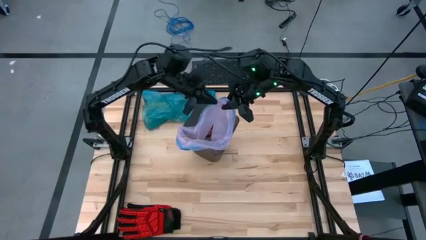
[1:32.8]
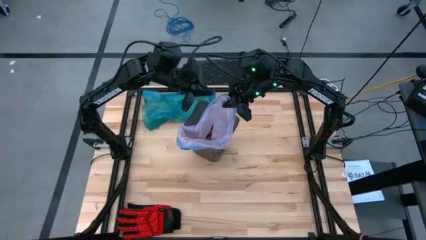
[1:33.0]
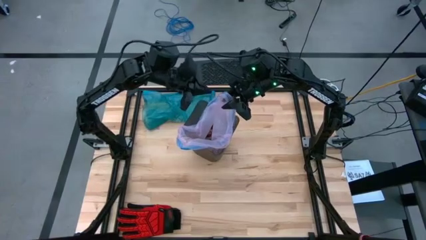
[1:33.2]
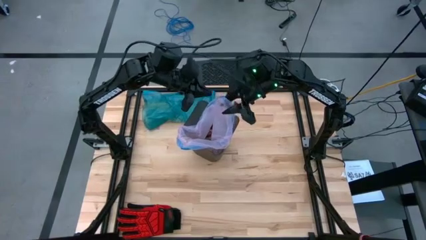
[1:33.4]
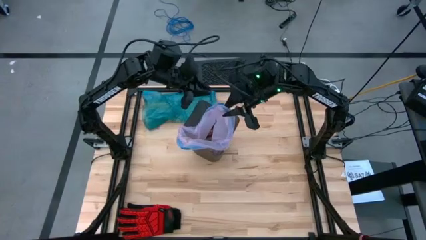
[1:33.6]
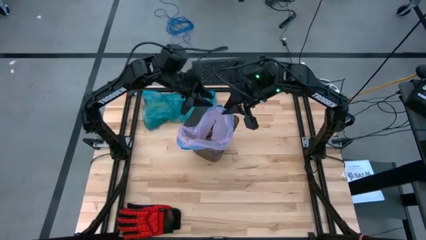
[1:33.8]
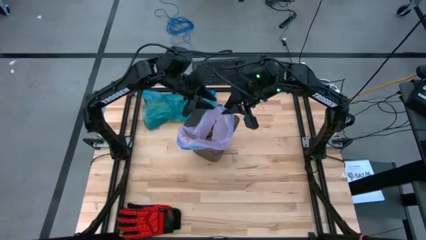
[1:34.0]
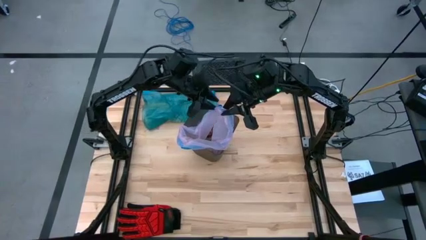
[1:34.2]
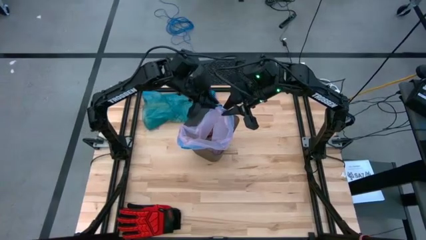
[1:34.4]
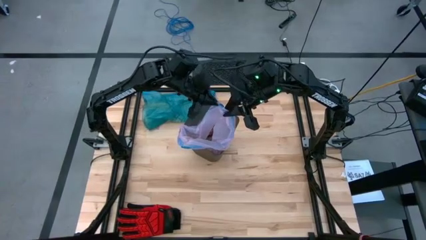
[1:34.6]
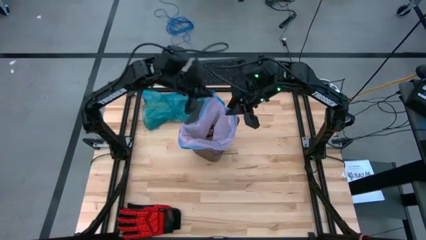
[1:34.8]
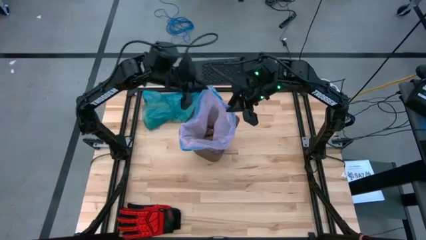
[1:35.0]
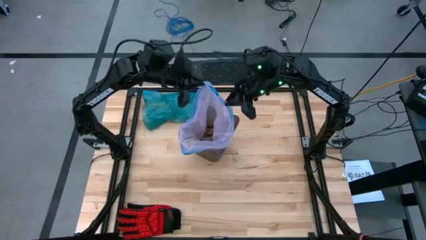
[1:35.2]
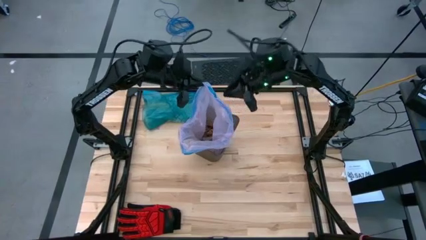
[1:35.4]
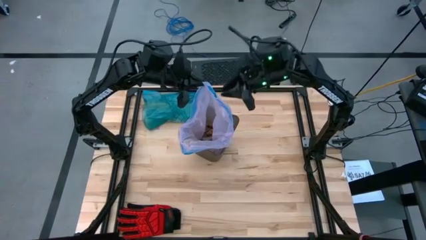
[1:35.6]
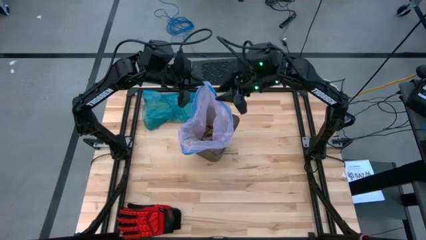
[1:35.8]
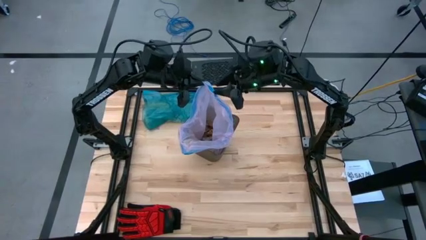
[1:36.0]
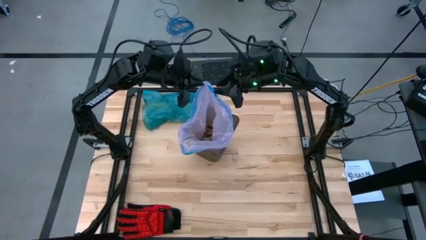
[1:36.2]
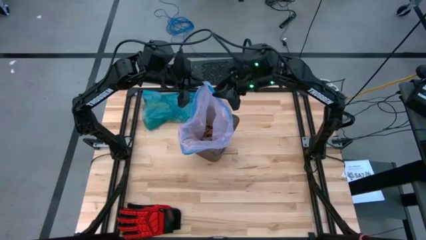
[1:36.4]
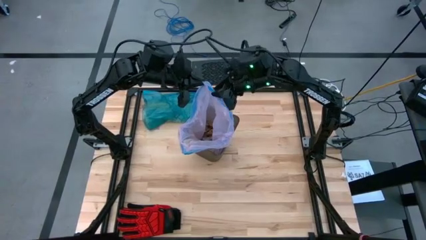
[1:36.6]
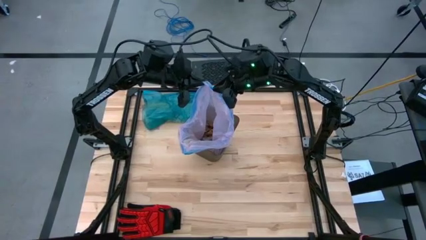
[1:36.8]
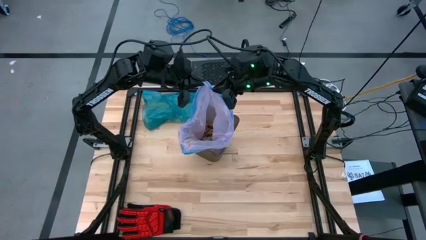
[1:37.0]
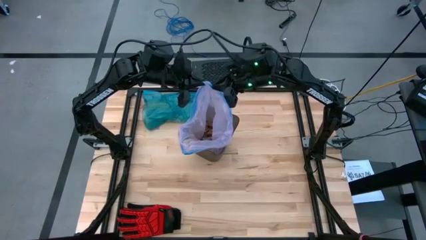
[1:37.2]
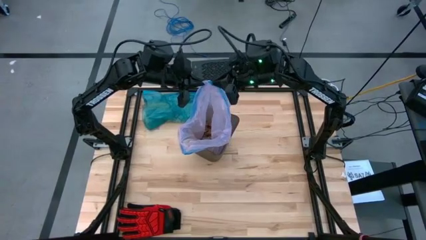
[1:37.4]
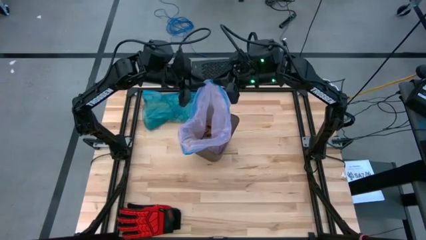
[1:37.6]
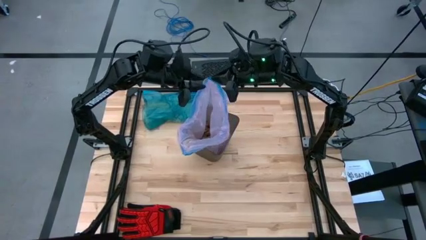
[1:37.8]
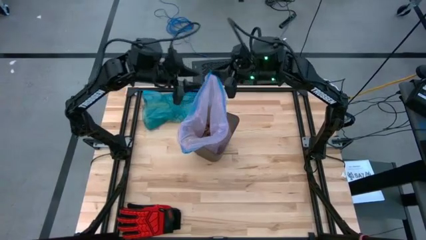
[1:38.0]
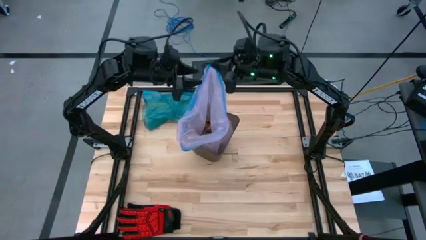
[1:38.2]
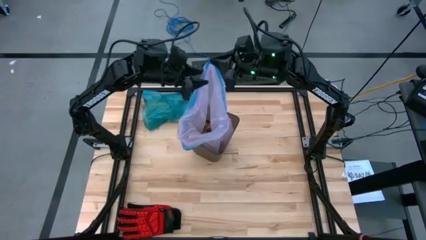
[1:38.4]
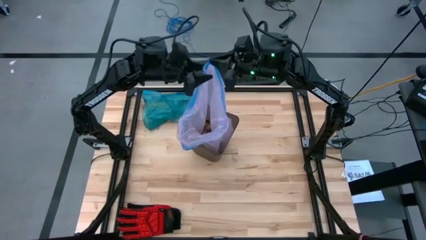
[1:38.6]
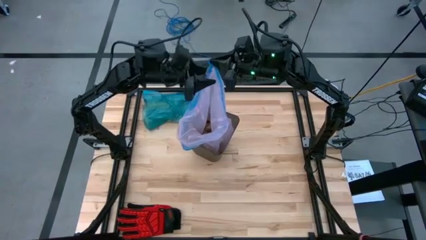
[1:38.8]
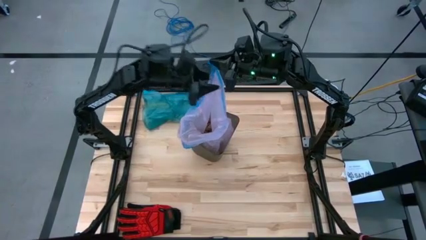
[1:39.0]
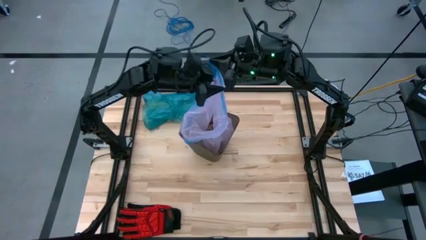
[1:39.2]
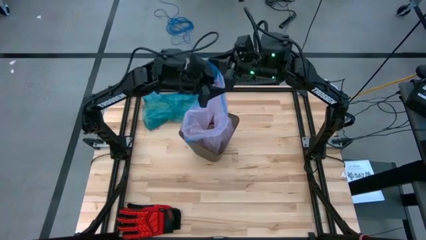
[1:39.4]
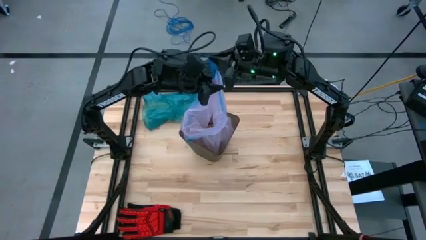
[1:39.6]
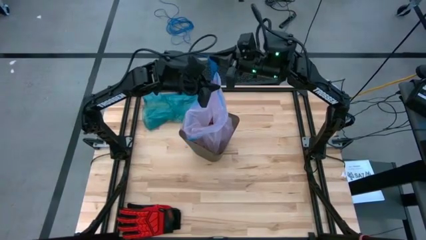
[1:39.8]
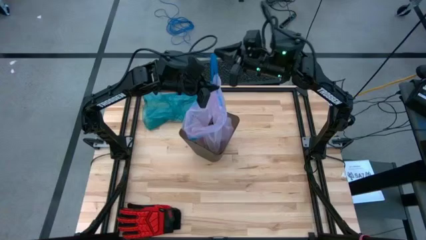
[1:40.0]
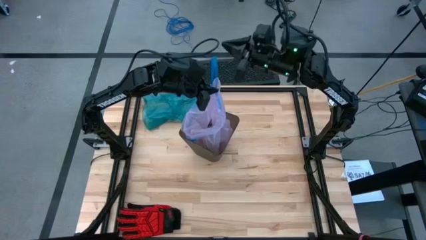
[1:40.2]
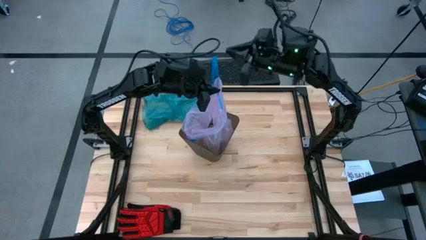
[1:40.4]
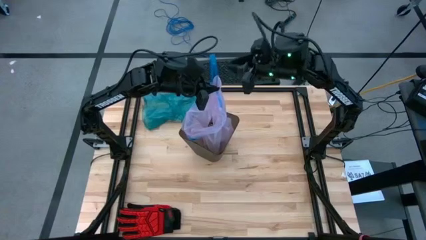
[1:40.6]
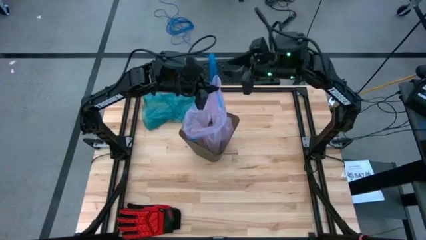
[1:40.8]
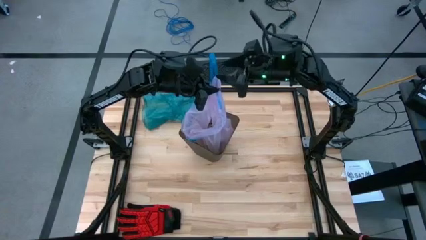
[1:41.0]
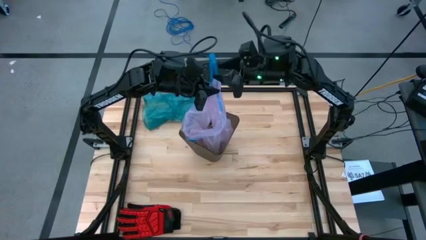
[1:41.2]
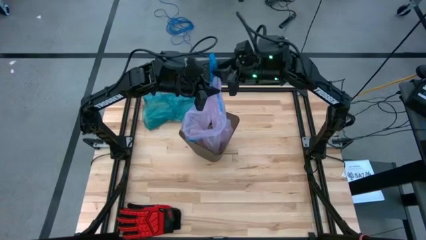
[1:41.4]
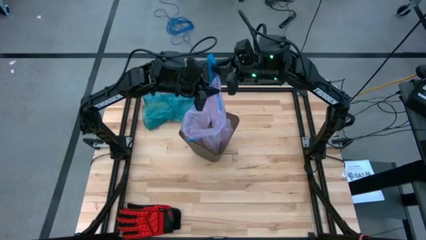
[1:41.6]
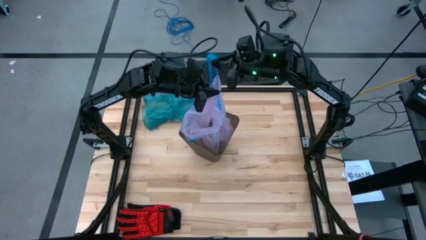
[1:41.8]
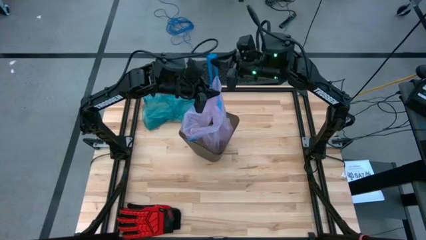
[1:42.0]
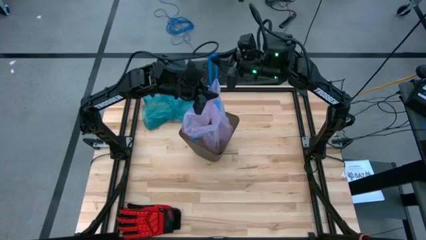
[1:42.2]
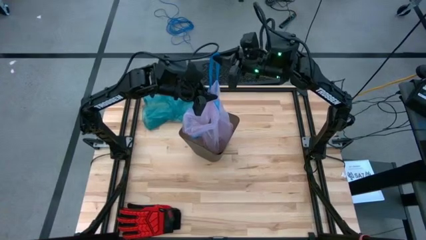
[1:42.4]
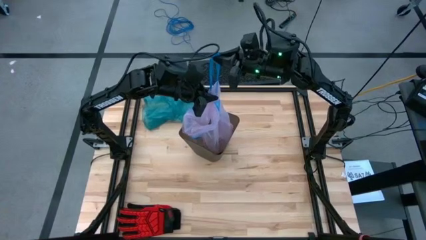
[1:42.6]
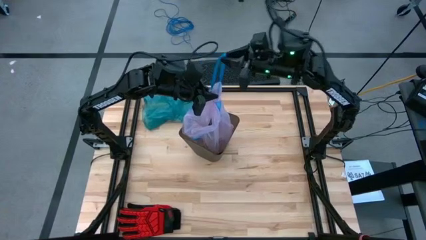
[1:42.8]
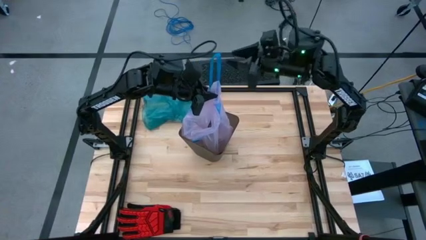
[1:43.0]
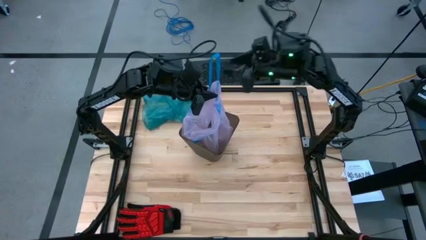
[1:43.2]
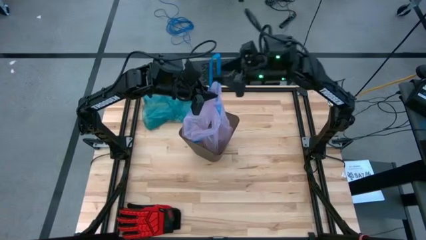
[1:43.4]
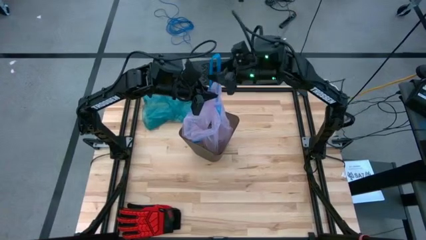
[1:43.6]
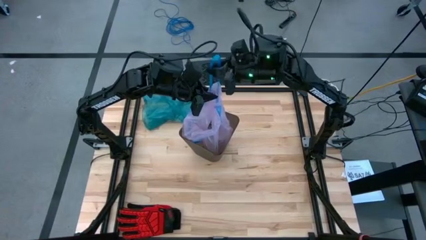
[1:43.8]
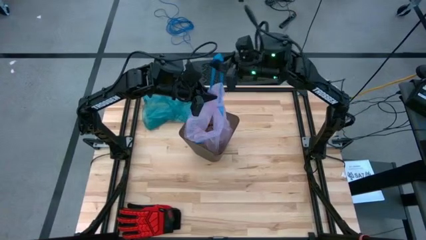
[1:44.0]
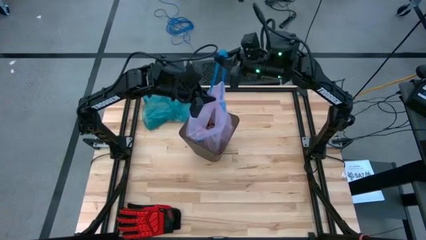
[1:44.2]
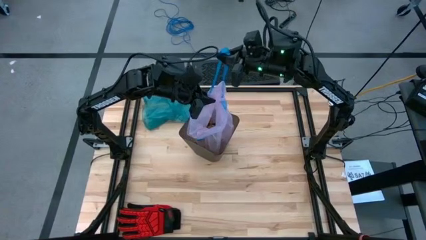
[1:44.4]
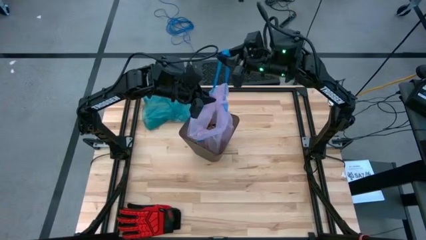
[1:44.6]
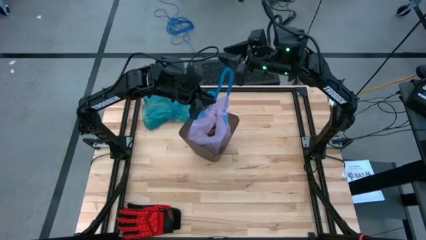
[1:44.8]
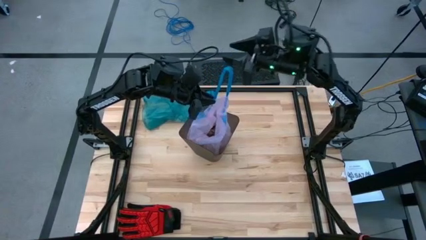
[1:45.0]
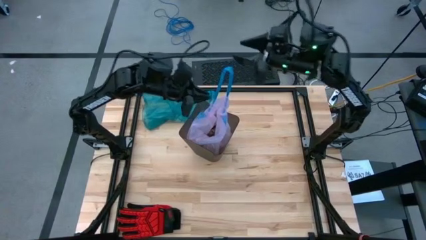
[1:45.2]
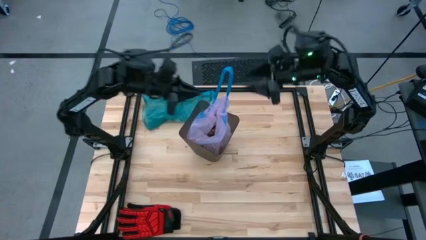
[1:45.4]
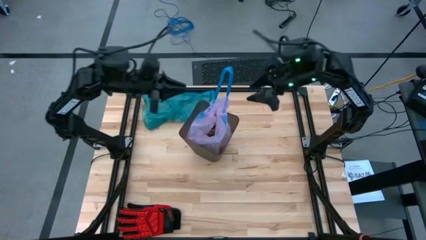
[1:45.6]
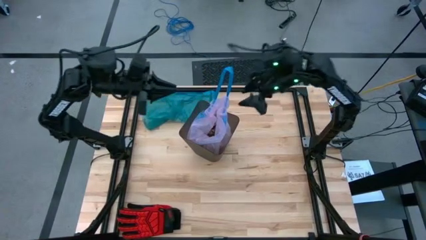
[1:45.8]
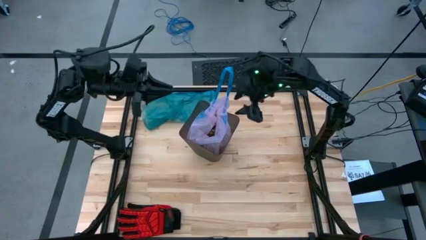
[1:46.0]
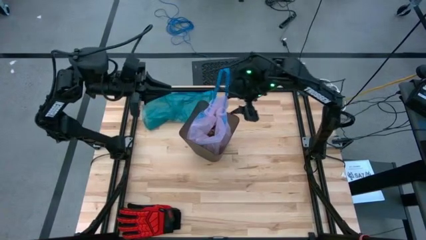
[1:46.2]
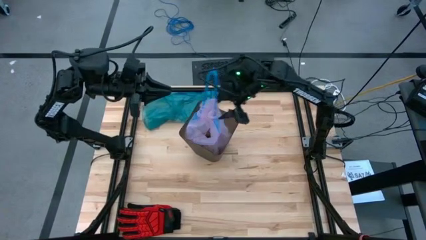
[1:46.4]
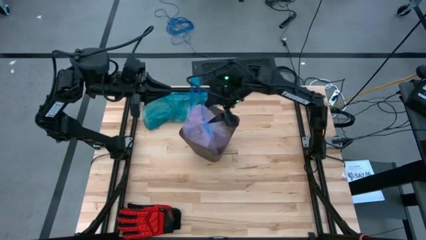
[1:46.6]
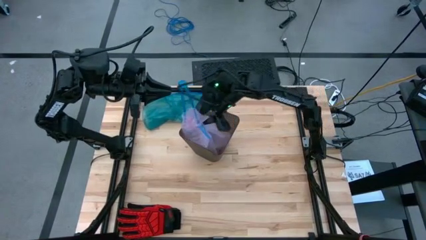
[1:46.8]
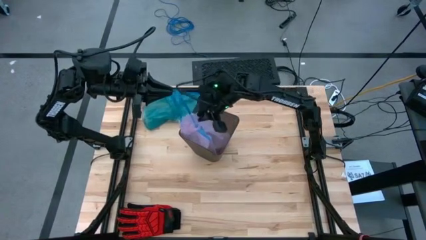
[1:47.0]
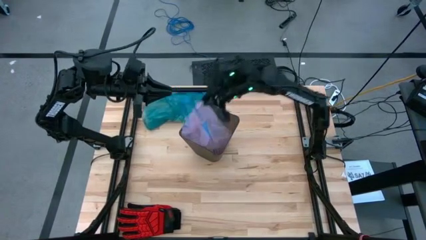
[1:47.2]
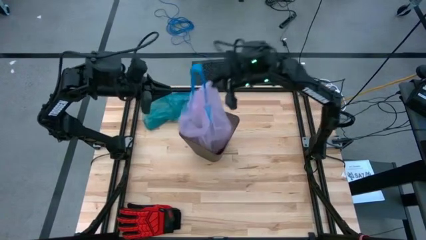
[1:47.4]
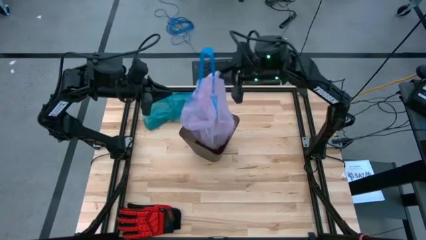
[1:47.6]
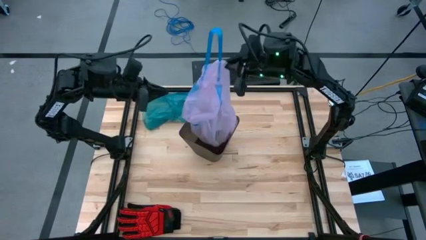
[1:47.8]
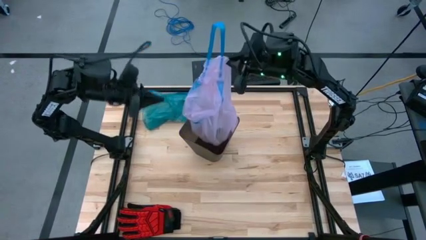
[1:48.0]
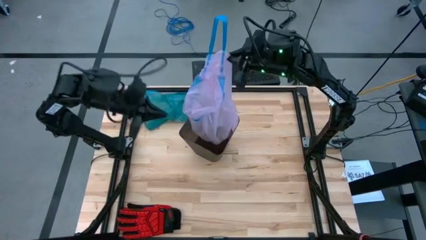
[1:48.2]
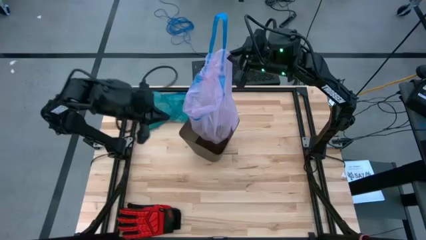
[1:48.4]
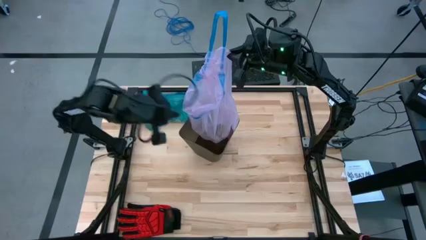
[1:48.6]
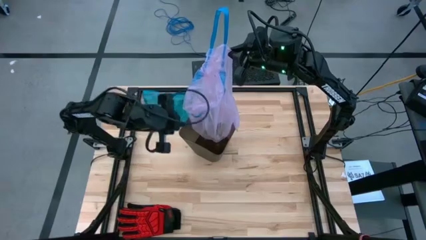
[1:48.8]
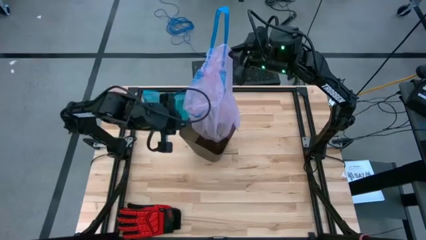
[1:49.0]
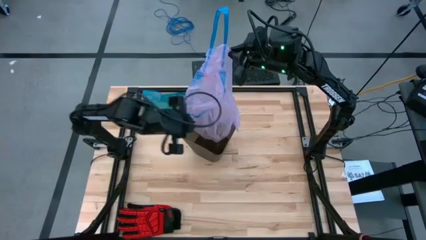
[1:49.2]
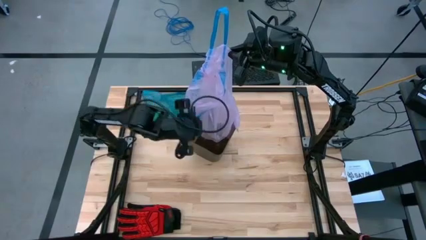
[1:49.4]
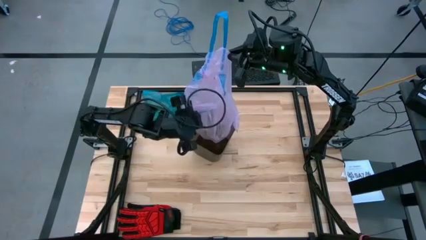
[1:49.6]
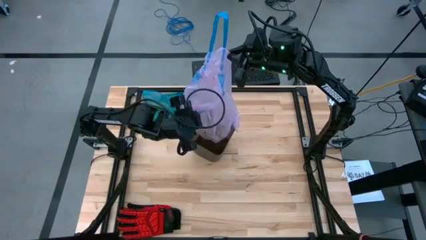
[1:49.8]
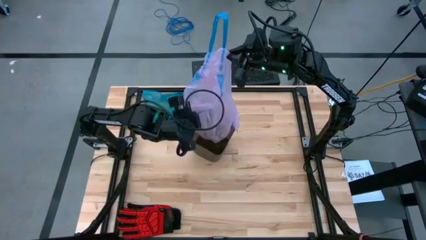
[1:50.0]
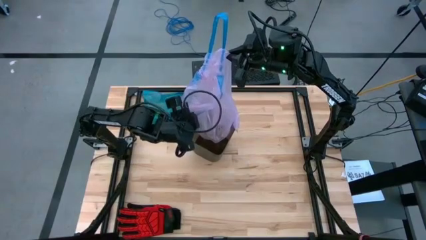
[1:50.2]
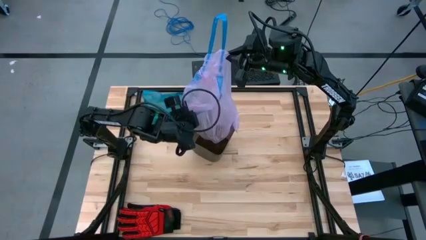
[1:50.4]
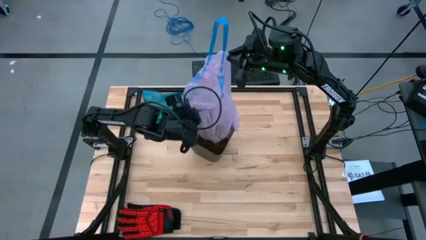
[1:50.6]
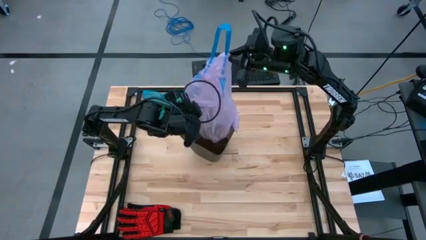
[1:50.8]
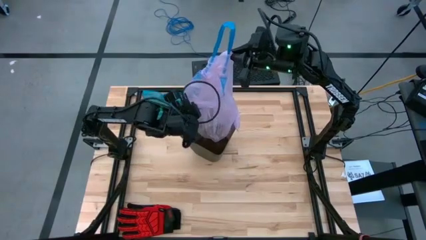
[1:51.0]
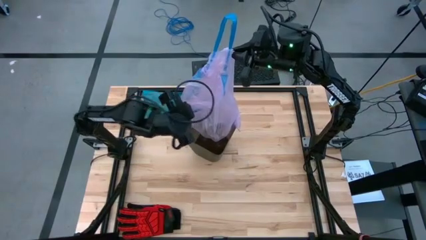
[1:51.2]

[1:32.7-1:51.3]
Task: place trash/remove bag and relplace
Remove the pink trash bag from the black trash bin
